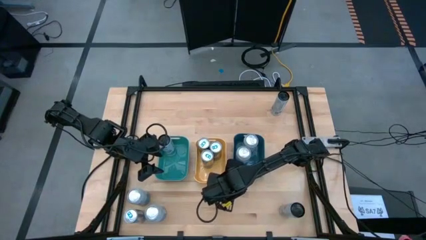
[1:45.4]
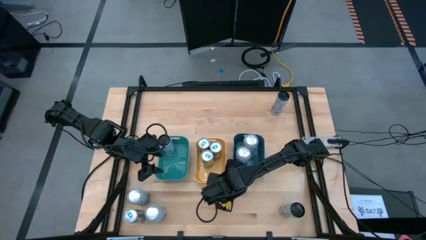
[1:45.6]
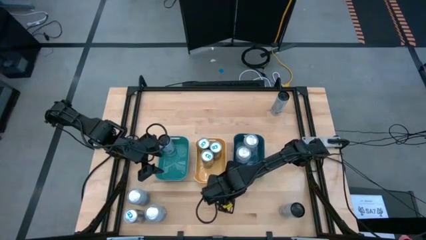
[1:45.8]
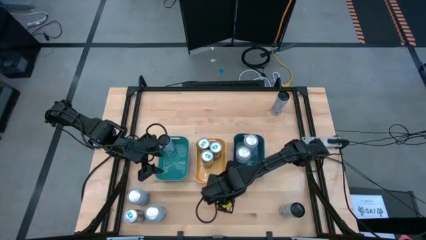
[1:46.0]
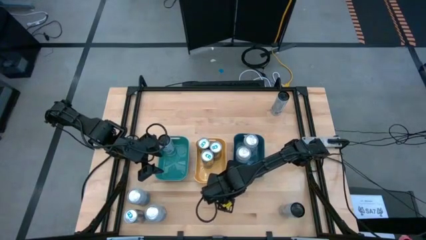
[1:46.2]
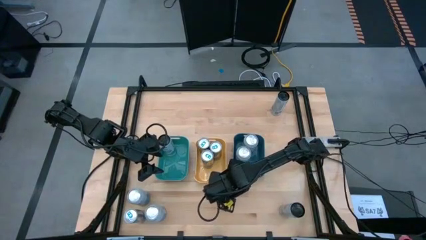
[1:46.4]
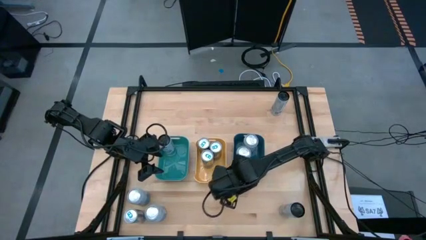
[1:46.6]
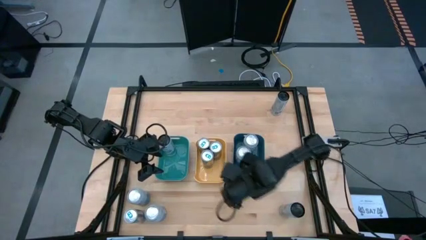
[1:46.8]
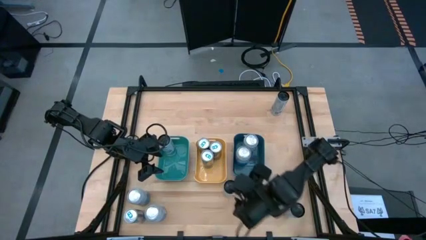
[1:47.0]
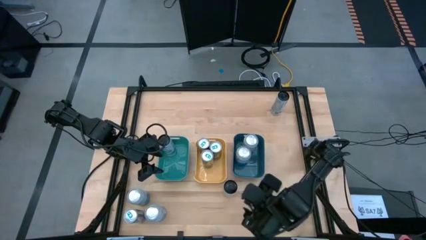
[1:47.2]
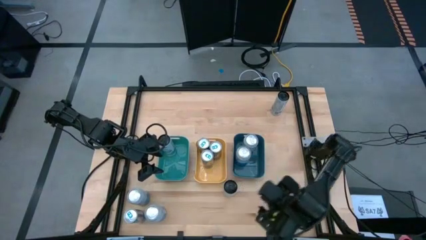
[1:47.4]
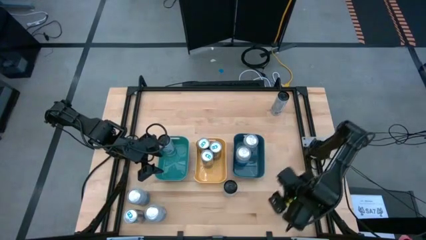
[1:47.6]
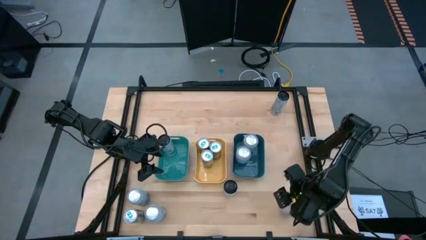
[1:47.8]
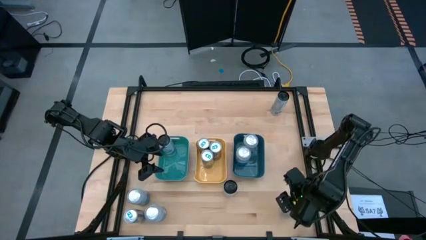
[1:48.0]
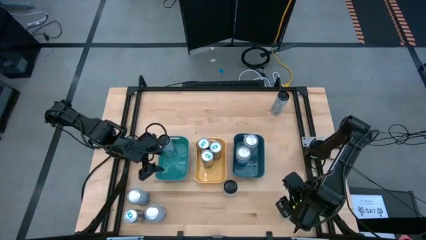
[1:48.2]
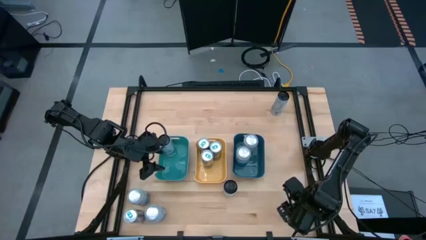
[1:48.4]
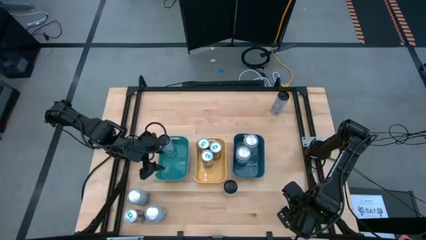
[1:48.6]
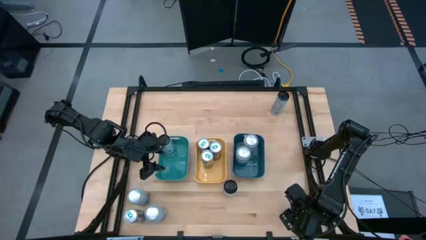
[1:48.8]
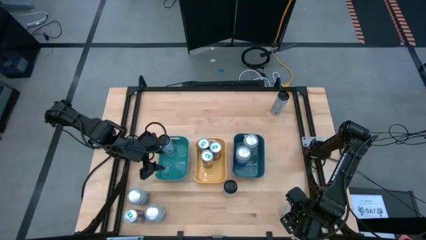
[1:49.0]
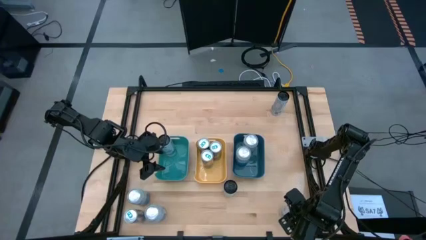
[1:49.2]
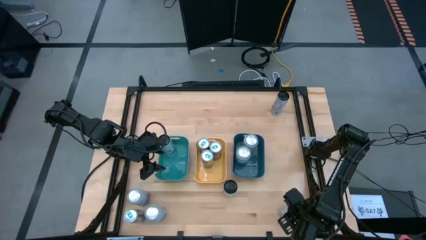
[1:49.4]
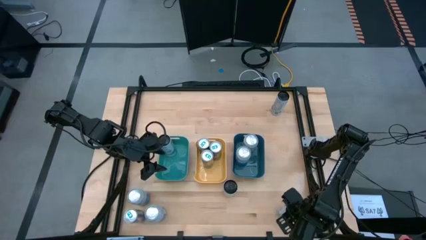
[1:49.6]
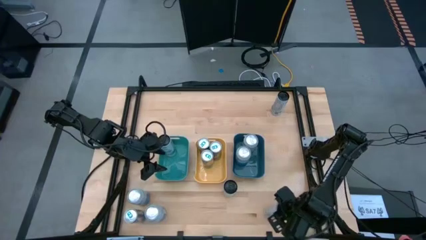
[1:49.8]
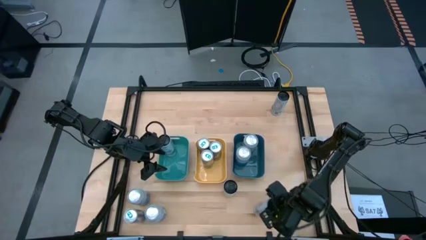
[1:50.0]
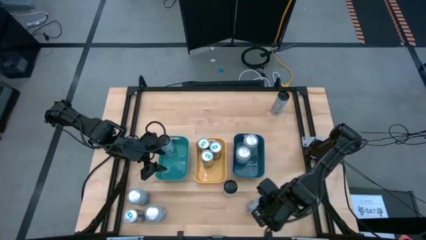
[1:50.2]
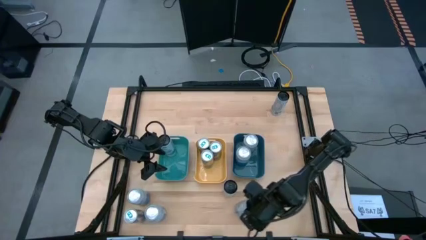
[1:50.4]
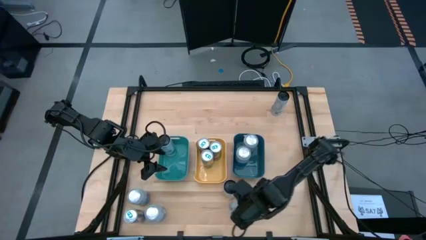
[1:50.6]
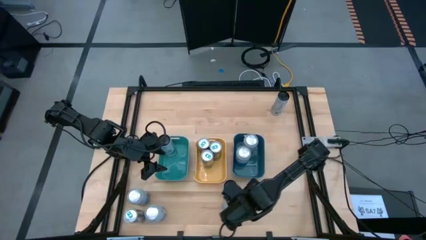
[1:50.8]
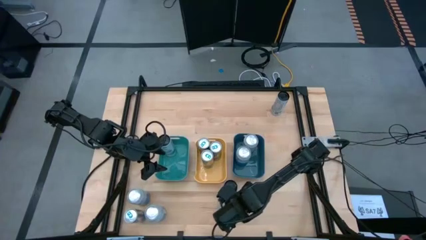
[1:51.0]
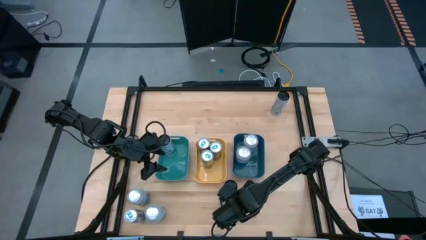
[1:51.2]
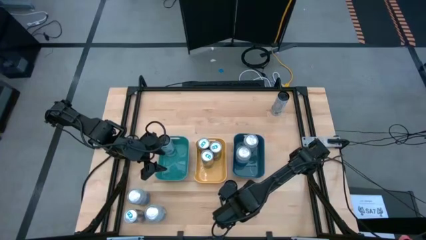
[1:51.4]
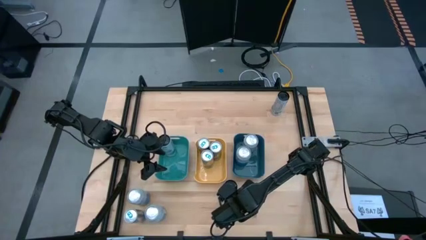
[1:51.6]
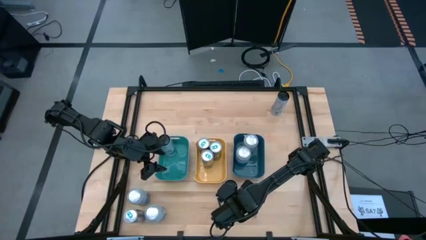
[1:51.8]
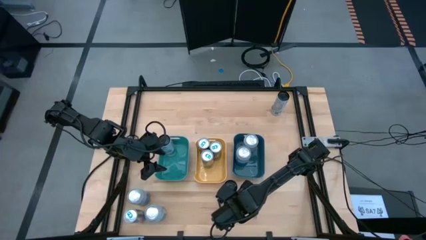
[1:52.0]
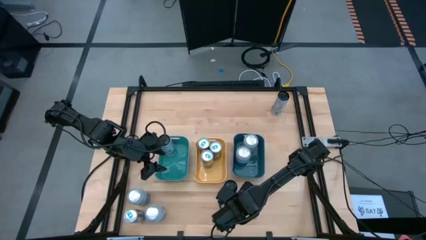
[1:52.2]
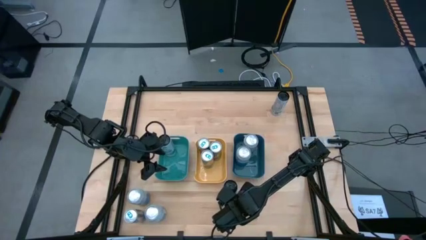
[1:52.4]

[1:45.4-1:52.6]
Task: Sort soda cans
Move the bottom black can to the lower middle of the table

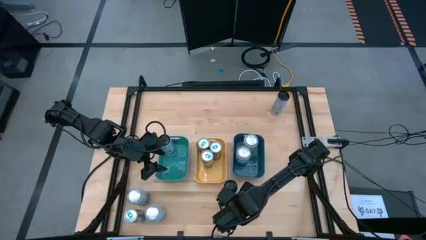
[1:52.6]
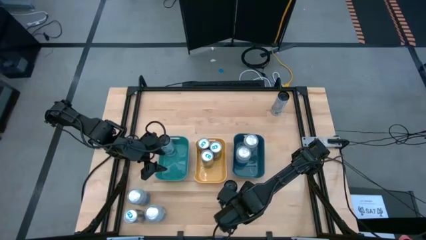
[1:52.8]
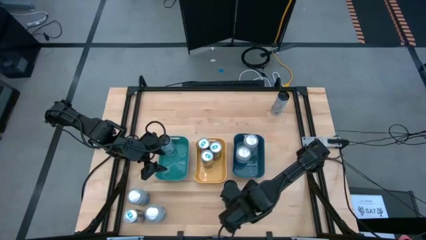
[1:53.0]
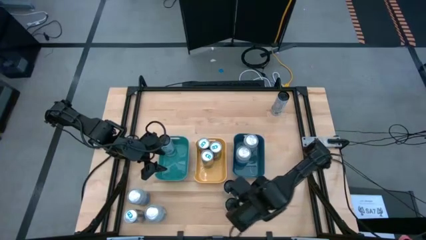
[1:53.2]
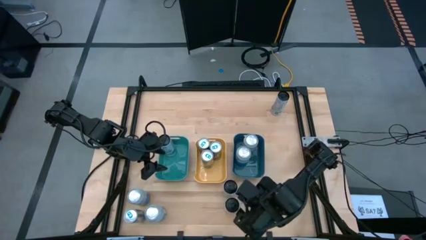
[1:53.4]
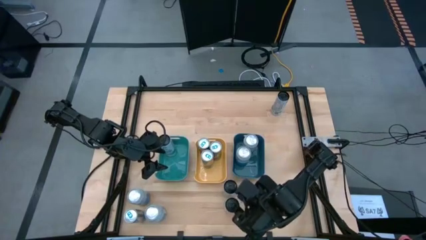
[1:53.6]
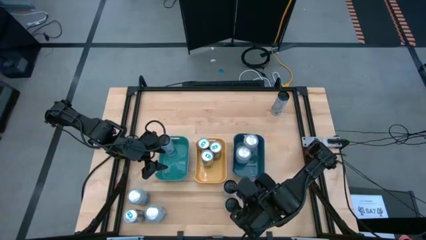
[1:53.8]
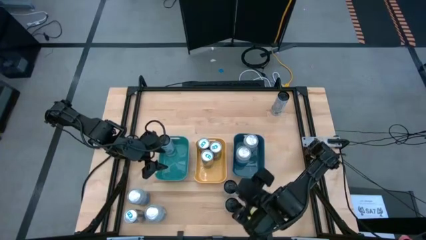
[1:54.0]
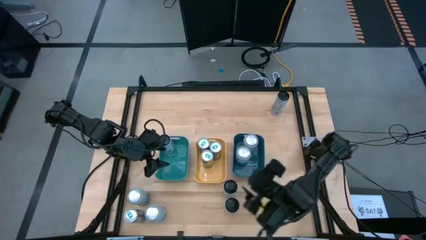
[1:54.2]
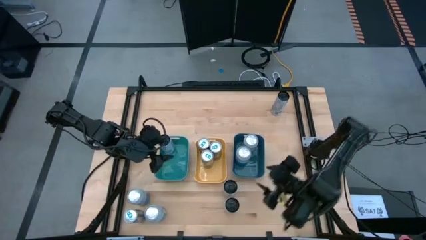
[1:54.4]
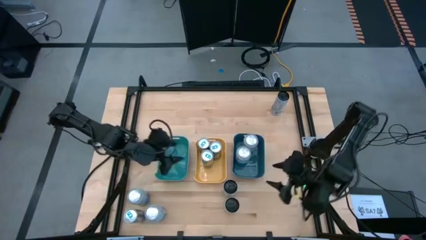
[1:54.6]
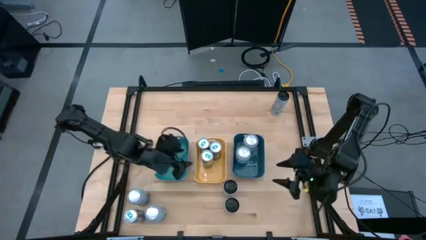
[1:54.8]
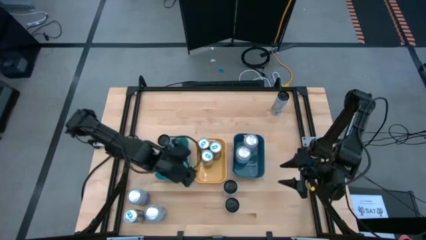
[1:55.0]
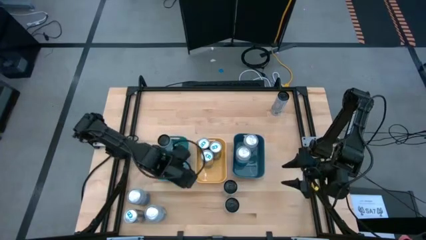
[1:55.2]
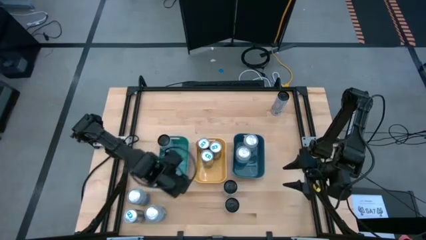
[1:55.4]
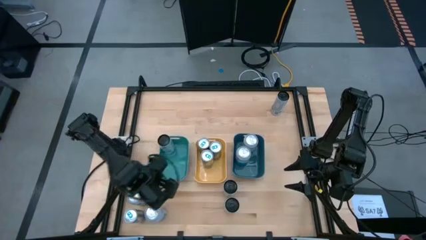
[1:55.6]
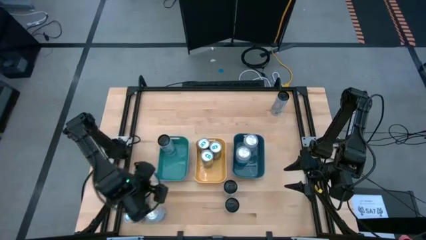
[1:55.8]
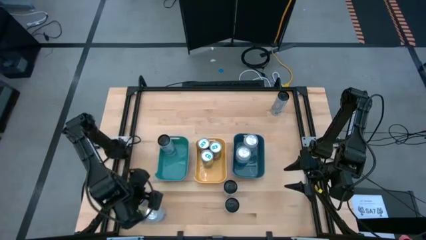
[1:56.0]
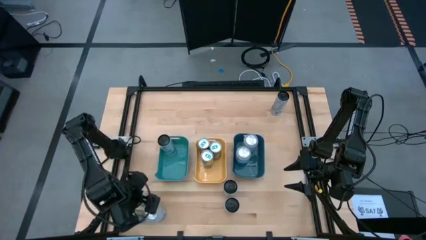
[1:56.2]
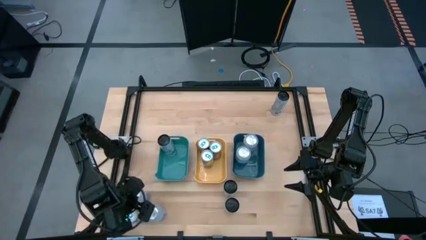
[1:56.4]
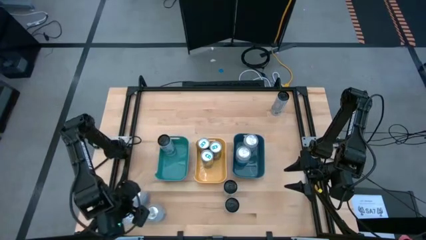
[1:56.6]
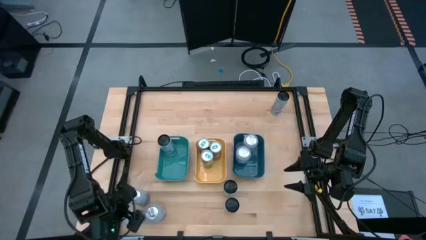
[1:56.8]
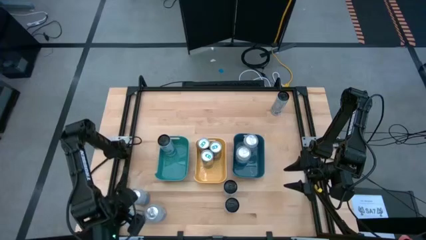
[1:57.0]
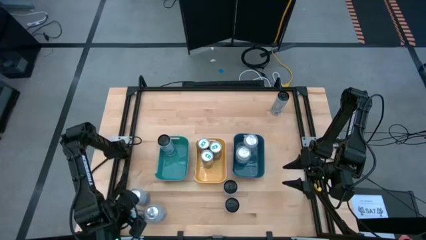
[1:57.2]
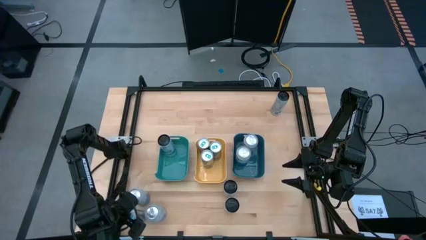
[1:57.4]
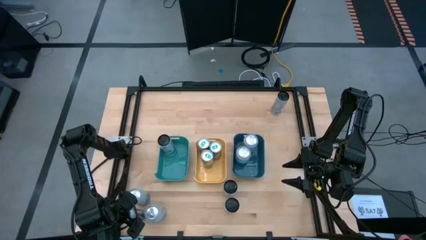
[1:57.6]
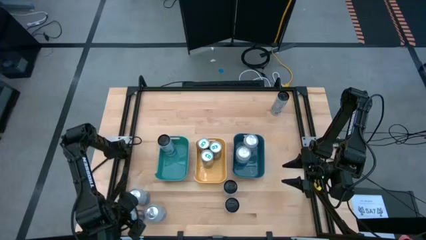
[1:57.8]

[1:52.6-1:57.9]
Put the lower left blue can into the yellow bin

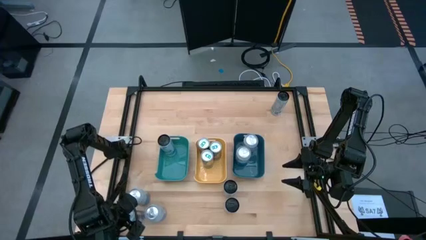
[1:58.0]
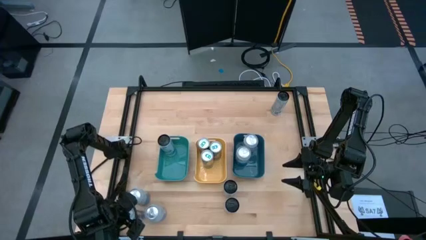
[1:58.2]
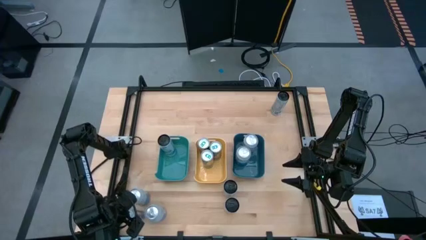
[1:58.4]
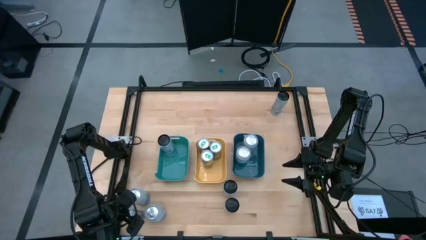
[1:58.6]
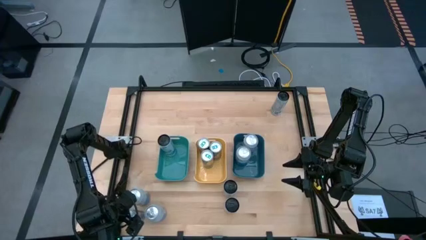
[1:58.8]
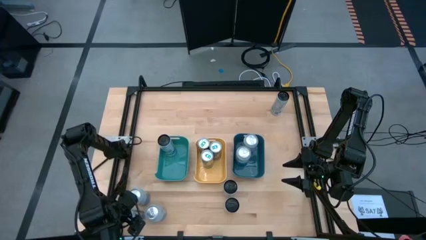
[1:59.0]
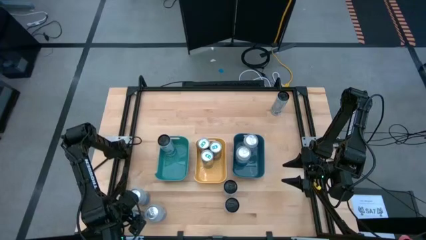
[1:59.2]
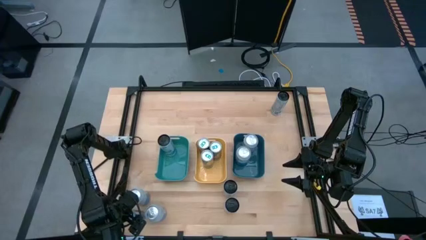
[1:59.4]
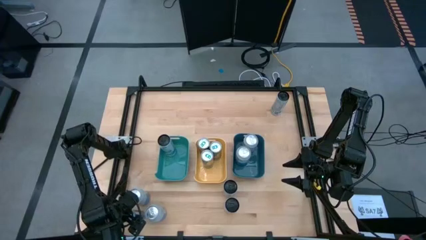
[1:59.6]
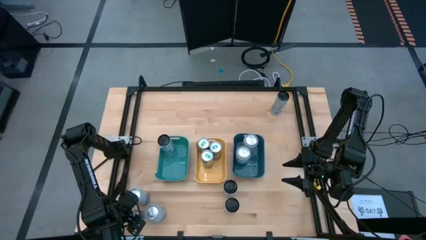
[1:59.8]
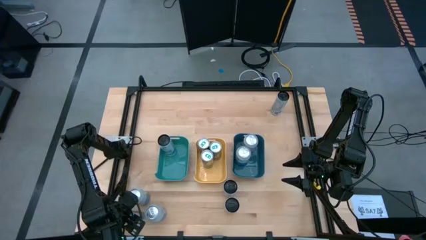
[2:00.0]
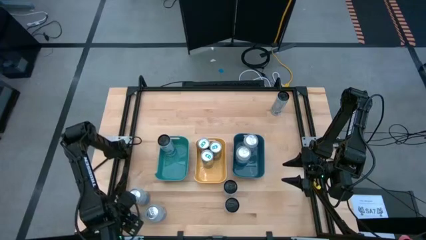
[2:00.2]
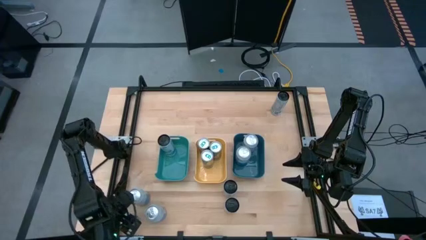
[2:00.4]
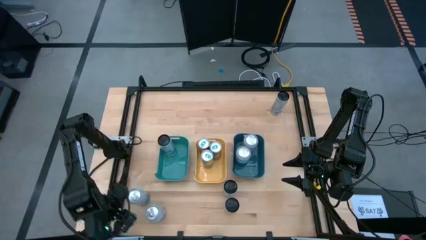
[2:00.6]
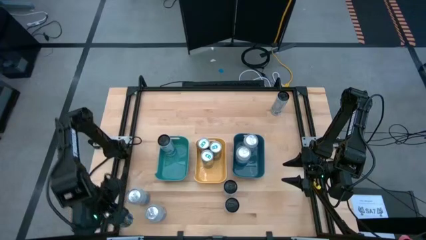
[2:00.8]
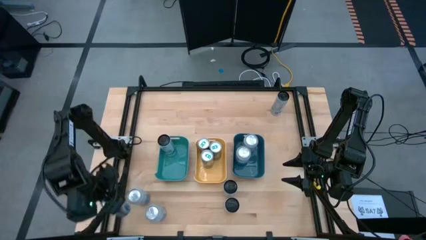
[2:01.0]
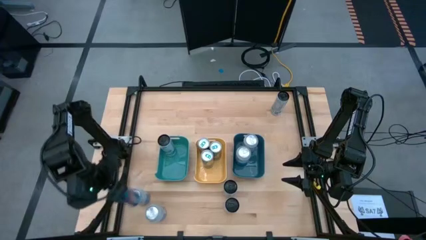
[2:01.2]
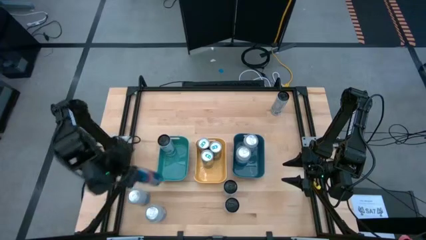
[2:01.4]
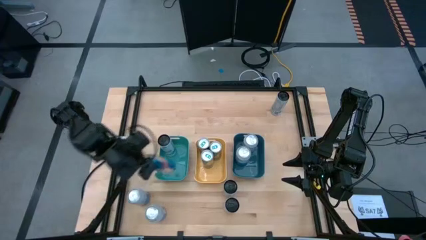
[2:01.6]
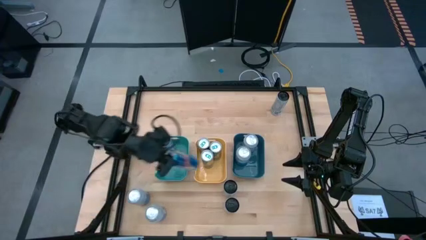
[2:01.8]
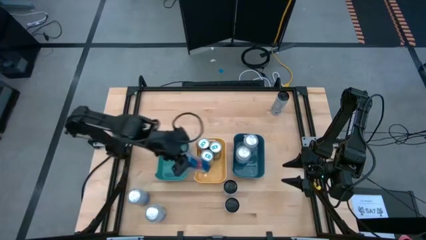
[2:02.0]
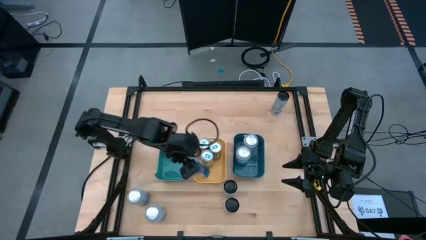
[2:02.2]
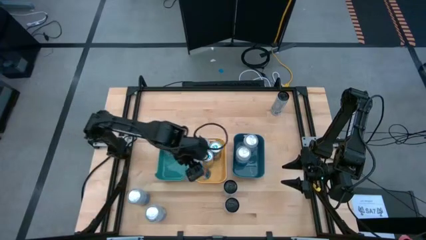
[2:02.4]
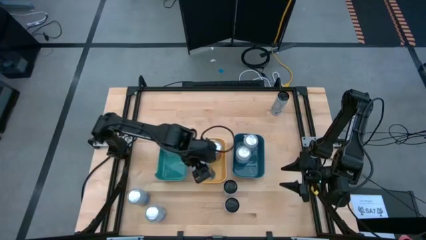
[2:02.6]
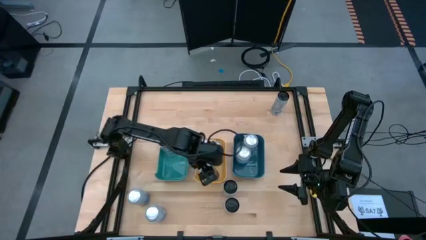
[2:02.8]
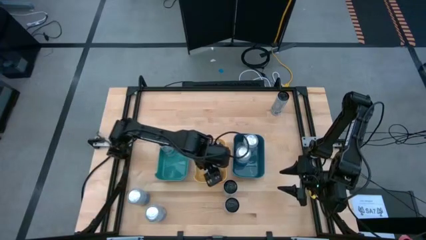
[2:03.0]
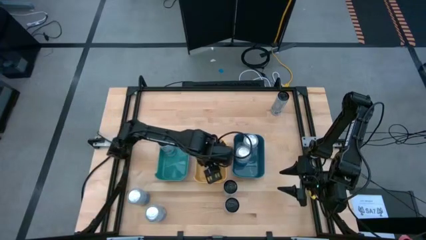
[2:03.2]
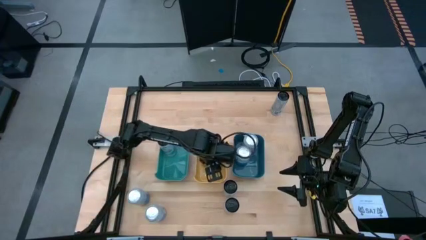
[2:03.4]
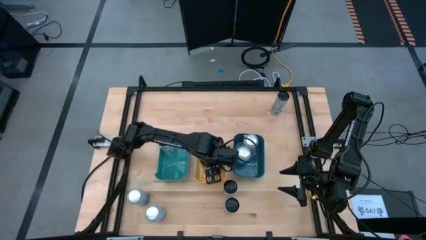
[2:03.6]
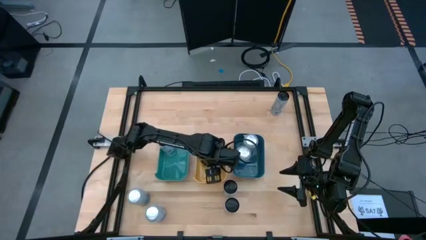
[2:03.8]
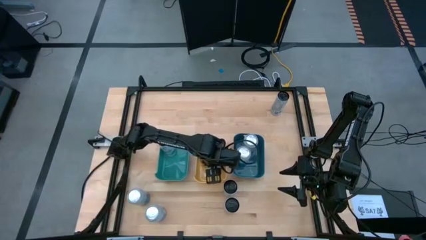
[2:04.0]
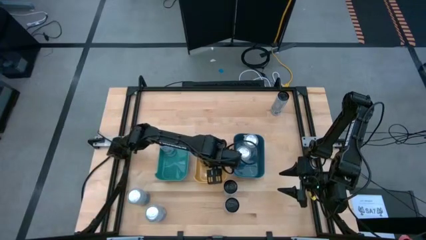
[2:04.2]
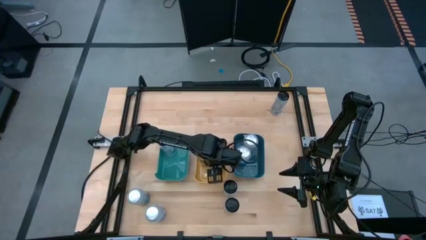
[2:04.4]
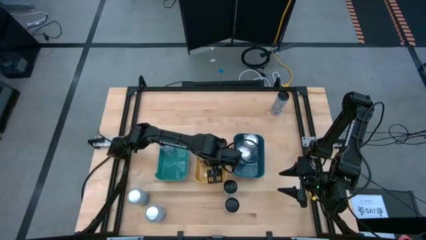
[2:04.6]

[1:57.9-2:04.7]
Put the lower left blue can into the yellow bin
